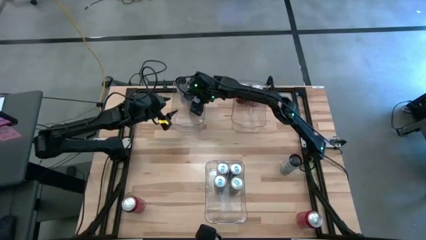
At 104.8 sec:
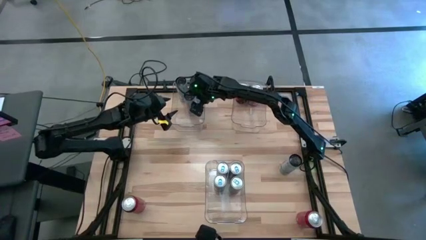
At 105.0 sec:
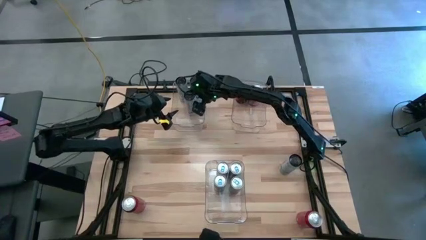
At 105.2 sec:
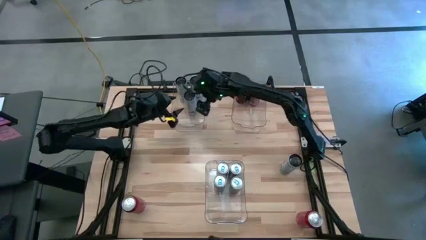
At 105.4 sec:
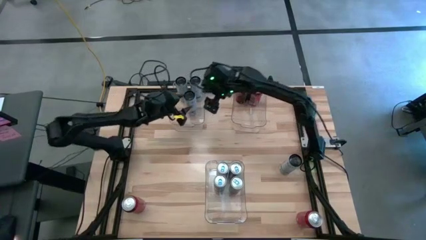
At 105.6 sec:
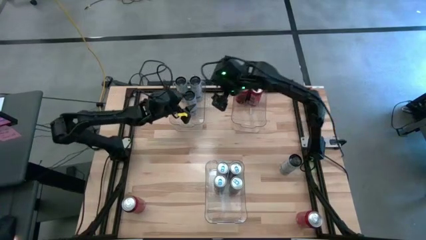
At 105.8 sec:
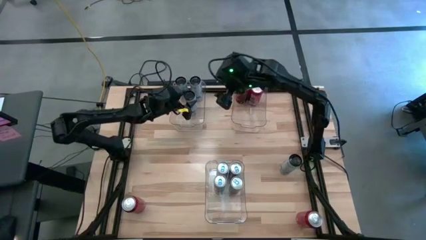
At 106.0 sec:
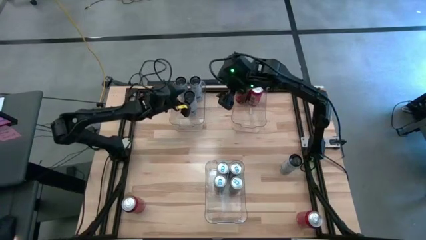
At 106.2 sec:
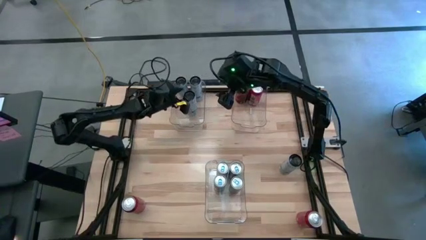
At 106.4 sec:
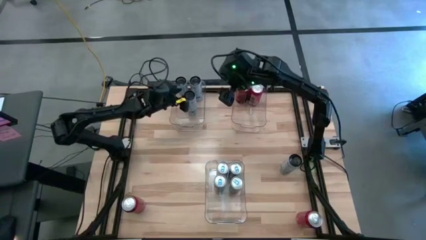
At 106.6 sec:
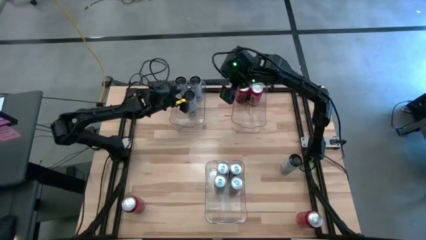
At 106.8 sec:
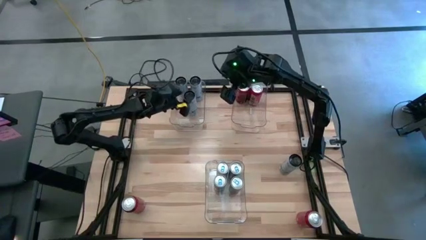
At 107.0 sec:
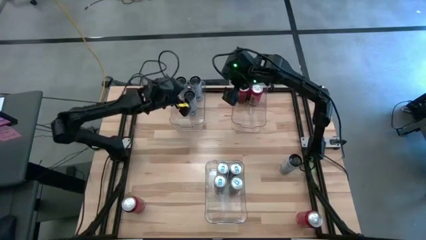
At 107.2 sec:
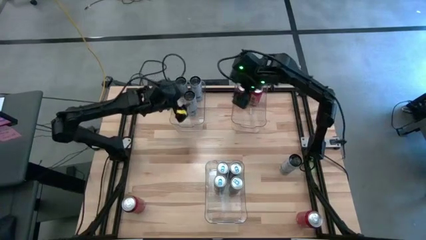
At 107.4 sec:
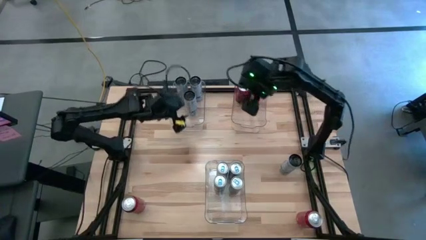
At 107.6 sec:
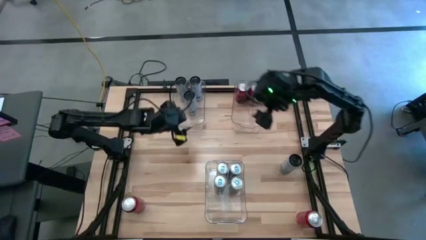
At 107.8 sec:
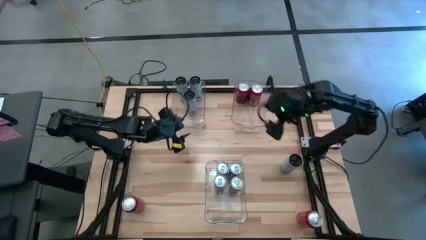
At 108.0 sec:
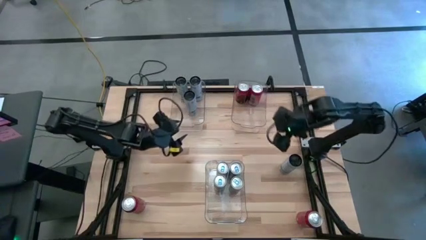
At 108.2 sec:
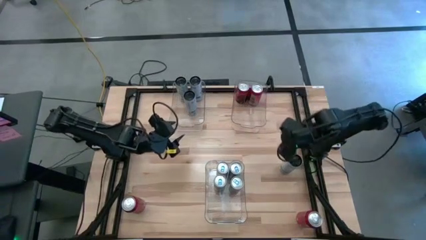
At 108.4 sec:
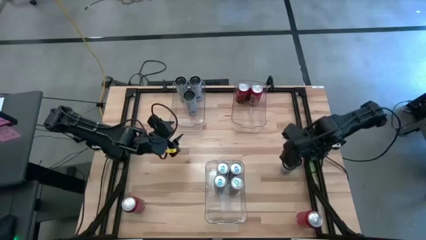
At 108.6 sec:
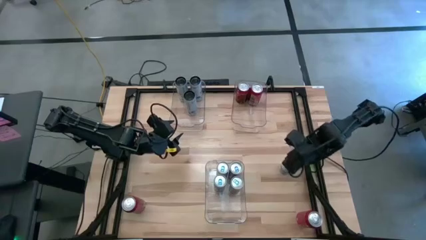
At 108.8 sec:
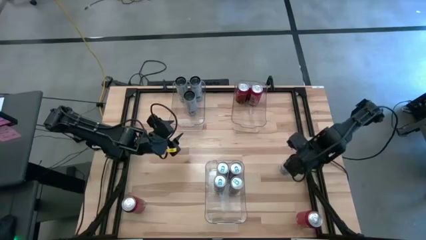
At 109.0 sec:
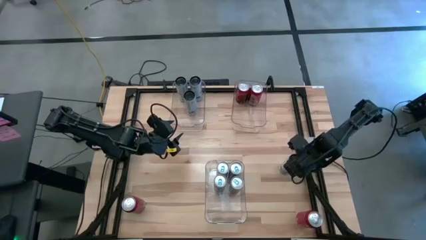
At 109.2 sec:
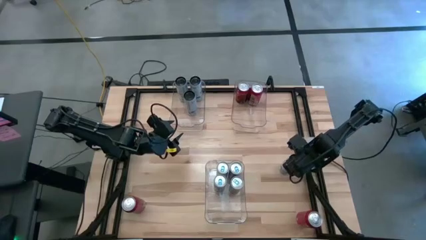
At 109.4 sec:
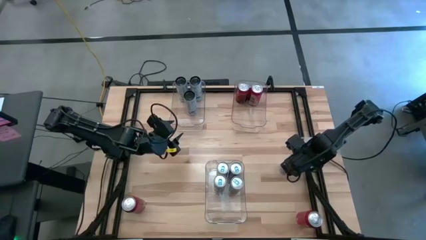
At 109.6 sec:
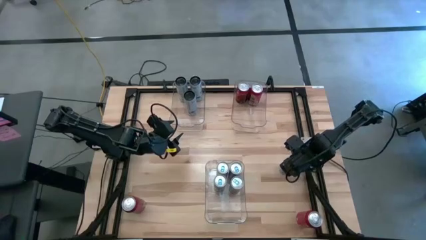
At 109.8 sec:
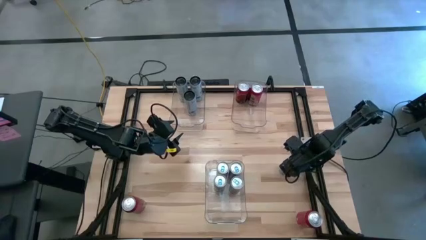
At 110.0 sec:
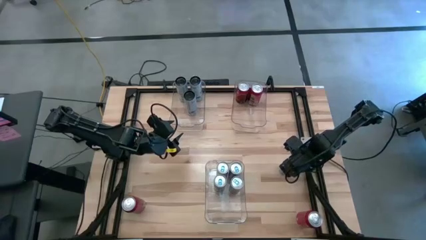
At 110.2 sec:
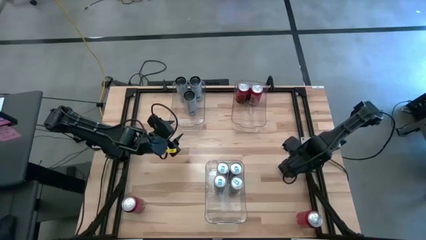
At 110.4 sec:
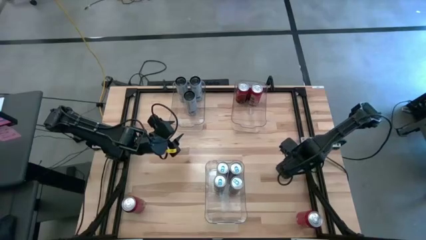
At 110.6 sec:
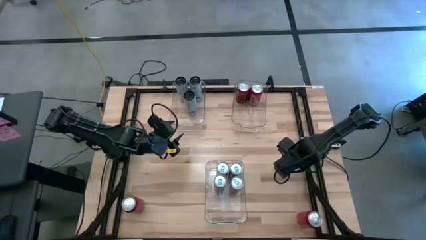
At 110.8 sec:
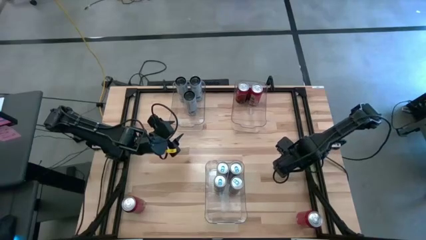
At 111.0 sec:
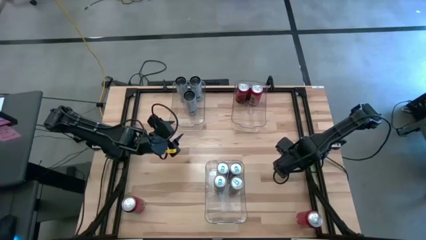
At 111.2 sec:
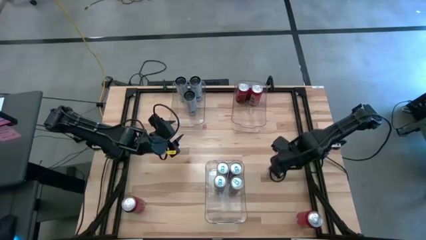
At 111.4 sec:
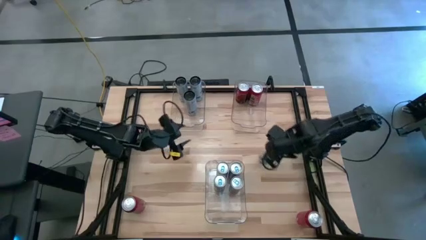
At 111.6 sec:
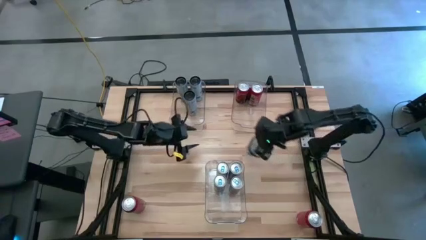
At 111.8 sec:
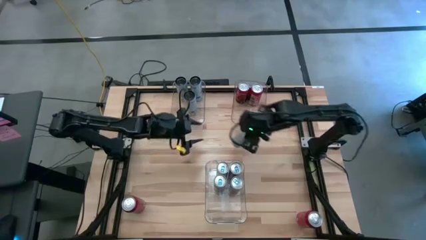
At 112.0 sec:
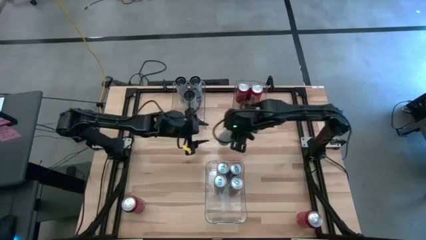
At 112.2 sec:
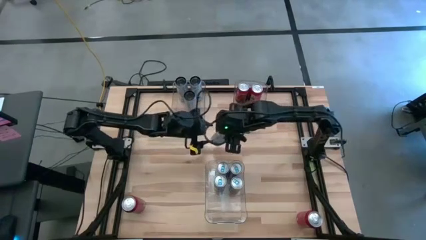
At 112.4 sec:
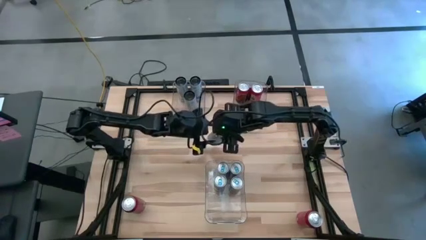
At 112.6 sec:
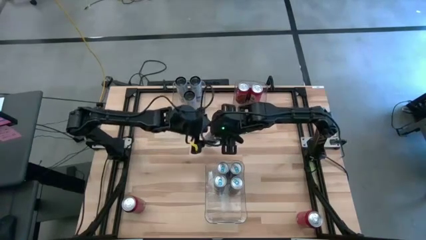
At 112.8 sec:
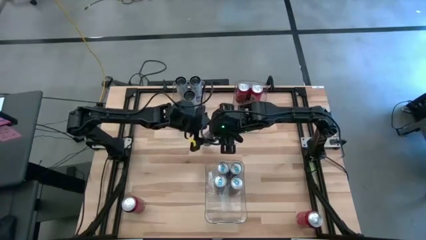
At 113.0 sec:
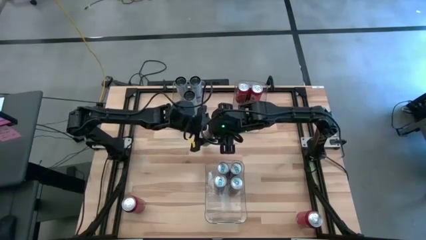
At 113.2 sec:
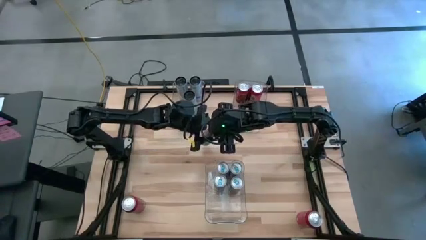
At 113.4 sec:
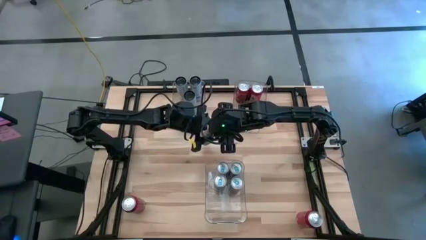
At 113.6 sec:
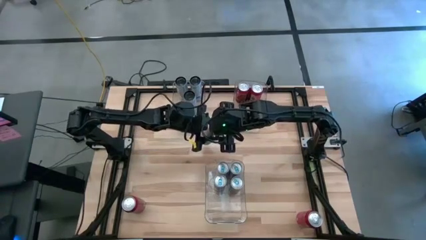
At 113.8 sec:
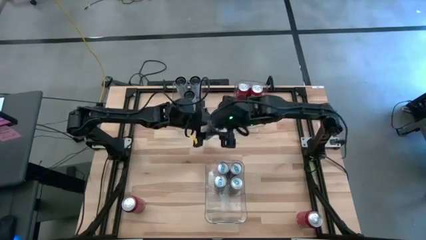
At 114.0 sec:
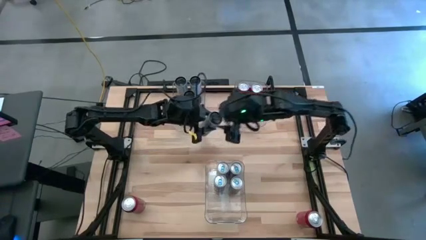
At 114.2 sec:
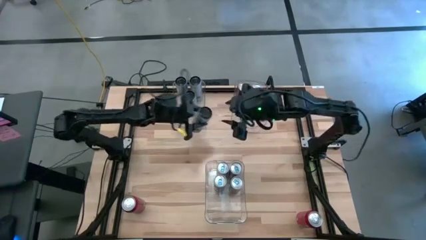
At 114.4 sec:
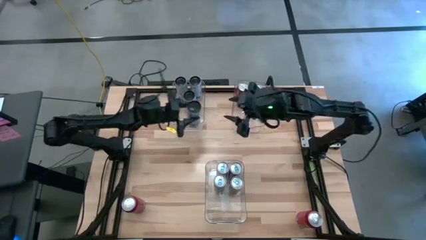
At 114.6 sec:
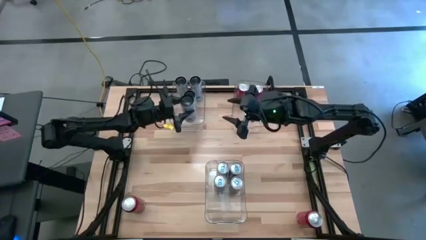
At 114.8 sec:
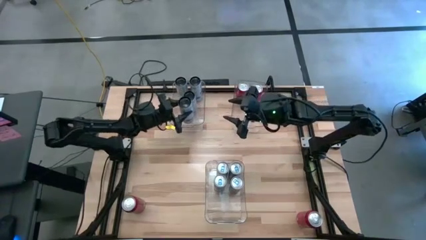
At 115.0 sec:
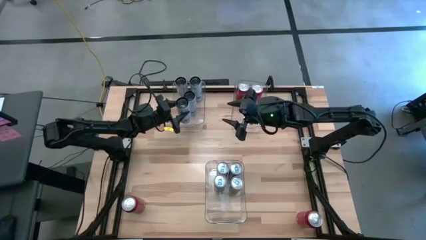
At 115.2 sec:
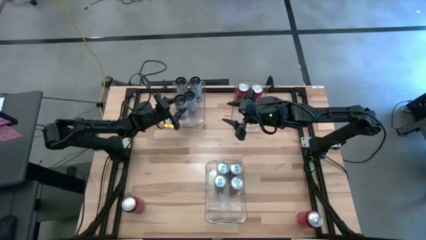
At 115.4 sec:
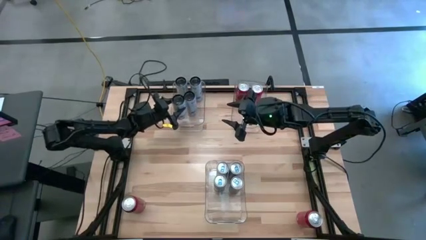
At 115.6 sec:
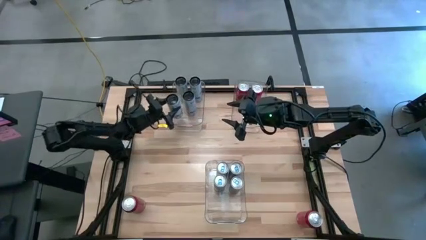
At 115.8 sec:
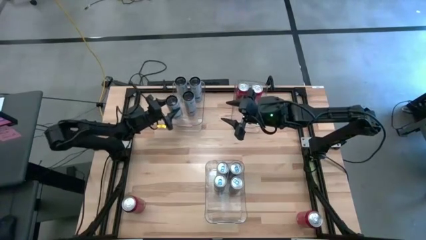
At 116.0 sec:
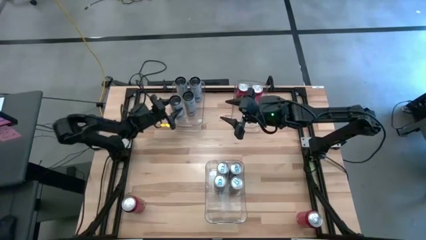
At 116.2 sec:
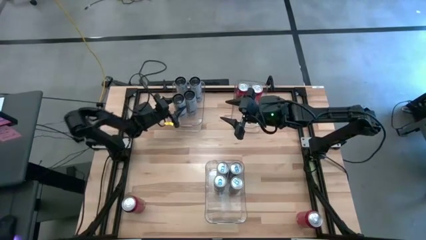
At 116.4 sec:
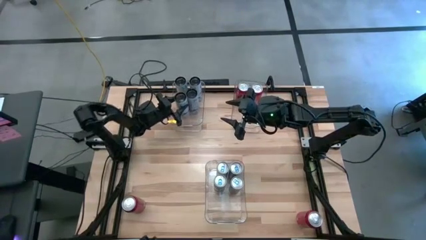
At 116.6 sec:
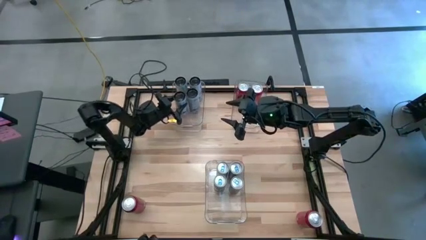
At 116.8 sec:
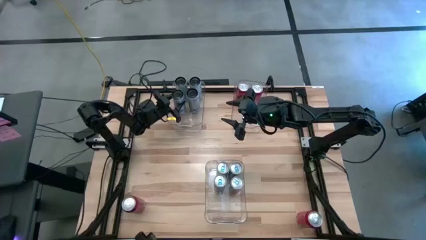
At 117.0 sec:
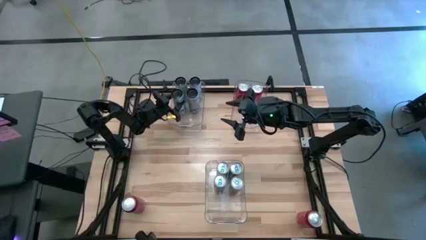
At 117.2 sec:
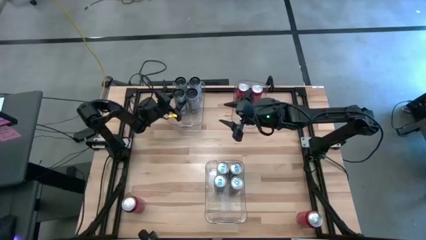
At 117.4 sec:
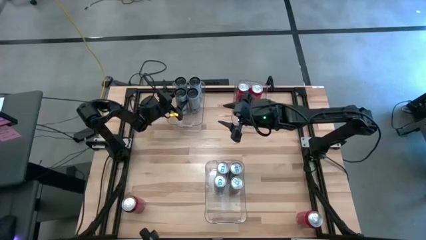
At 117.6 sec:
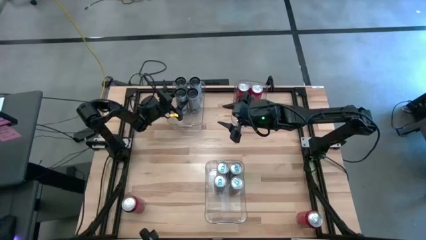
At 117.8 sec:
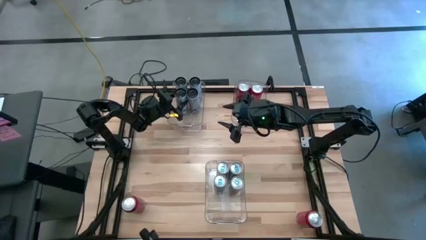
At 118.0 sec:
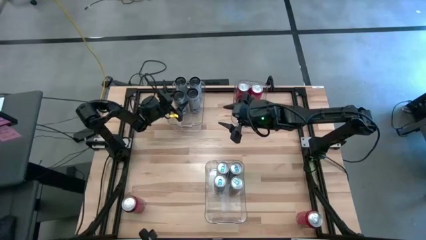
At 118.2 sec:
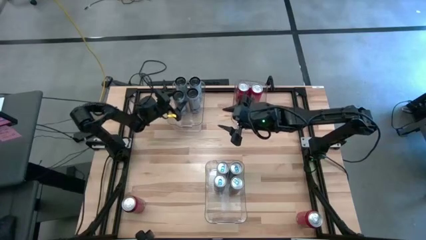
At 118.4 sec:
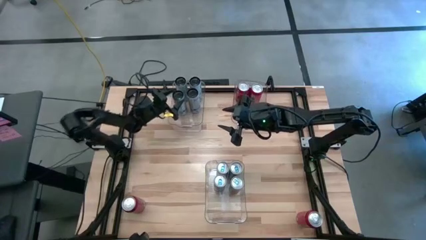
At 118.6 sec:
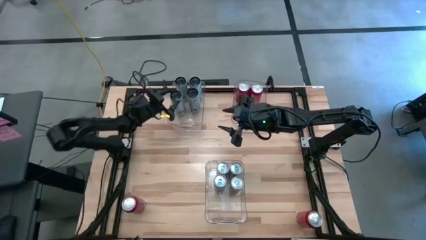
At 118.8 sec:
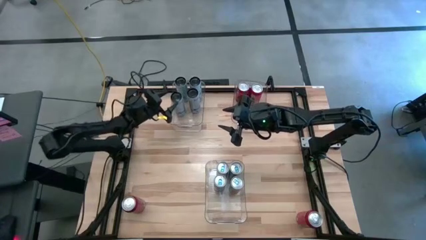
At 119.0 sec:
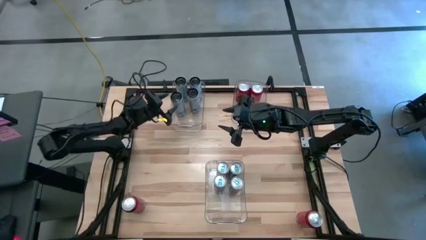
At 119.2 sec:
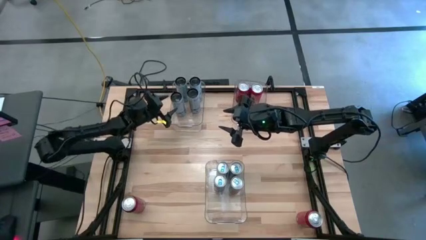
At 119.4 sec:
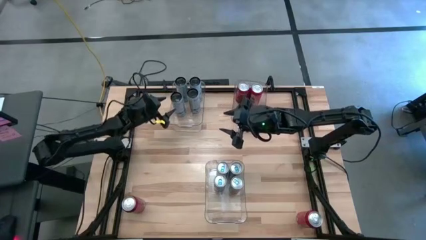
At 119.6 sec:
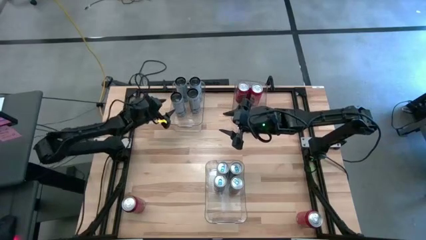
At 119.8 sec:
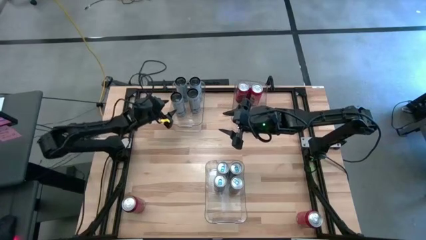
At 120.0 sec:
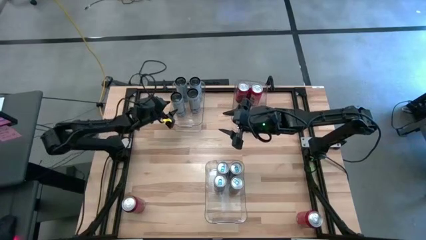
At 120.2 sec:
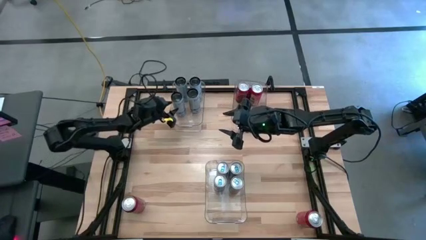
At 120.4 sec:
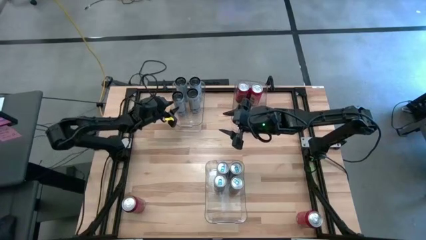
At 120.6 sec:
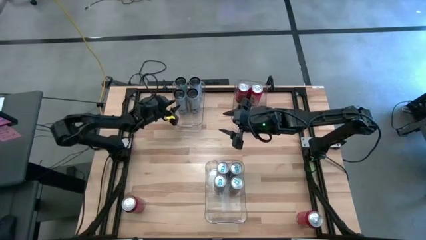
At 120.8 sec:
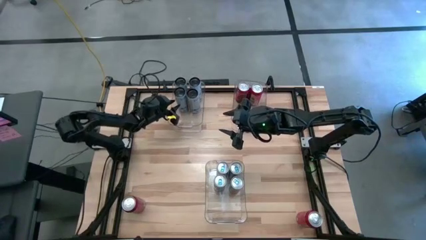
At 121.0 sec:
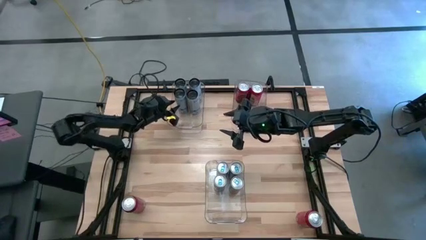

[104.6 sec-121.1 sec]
Task: Sort soda cans
Put the white soda can into the top left transparent bin
